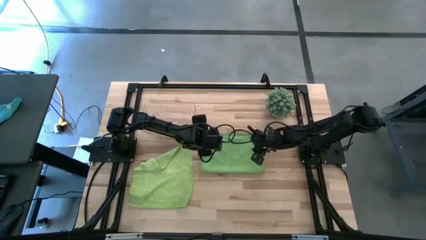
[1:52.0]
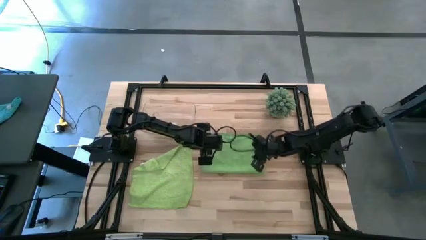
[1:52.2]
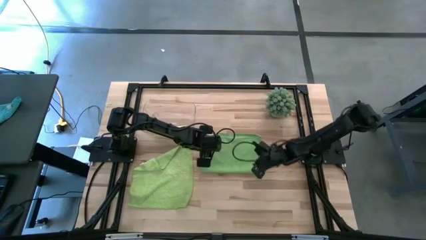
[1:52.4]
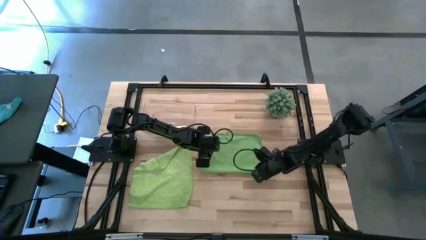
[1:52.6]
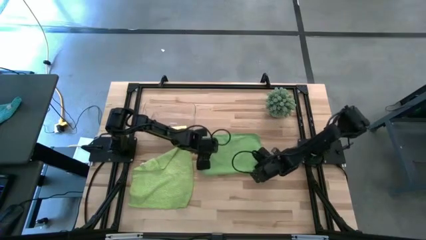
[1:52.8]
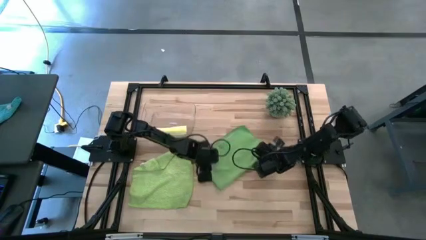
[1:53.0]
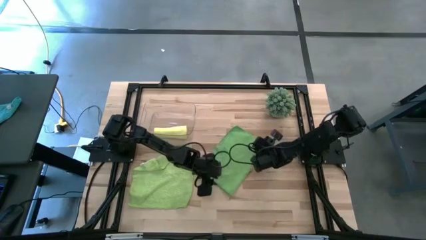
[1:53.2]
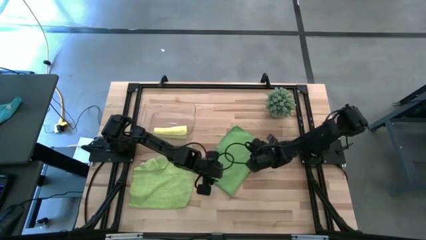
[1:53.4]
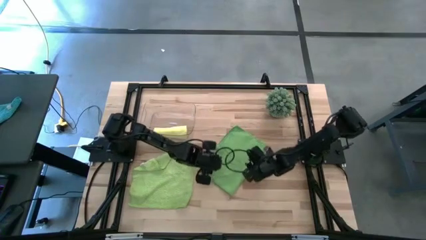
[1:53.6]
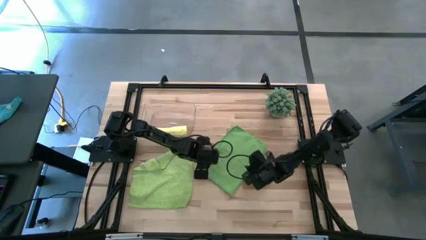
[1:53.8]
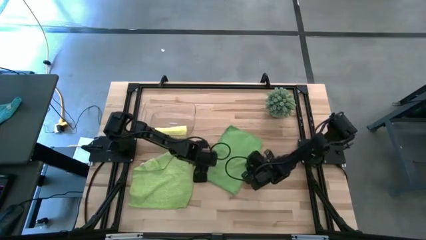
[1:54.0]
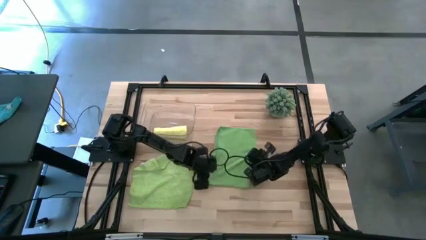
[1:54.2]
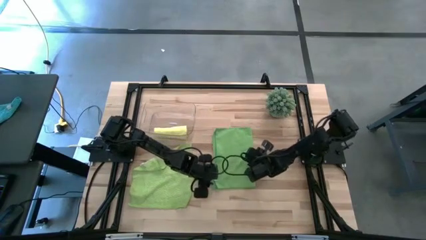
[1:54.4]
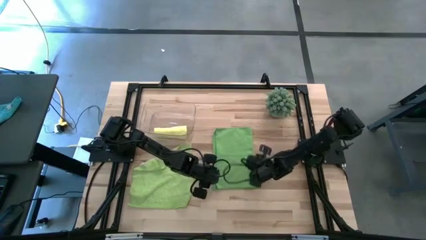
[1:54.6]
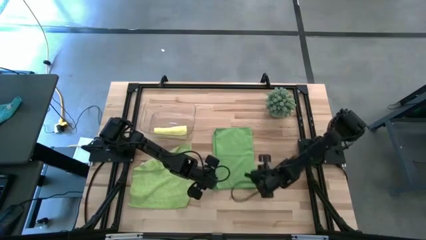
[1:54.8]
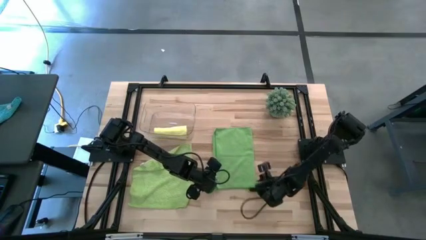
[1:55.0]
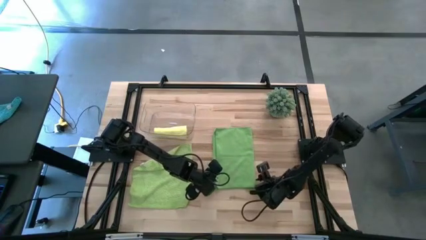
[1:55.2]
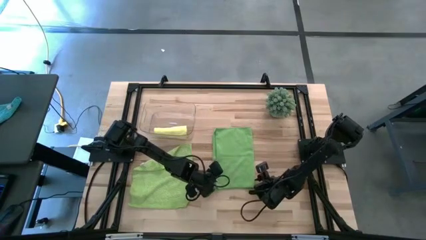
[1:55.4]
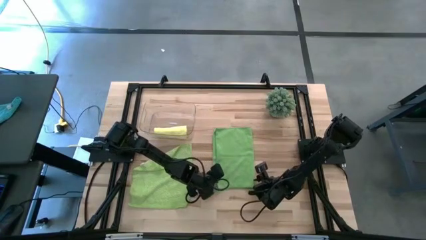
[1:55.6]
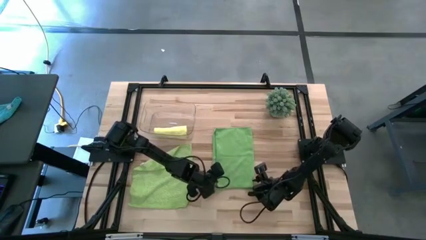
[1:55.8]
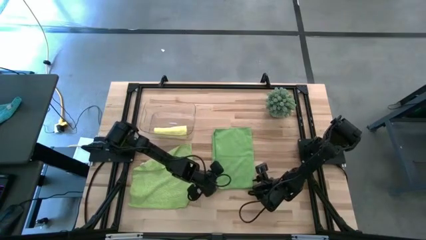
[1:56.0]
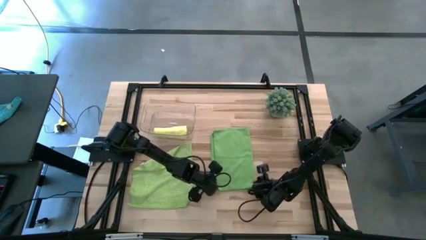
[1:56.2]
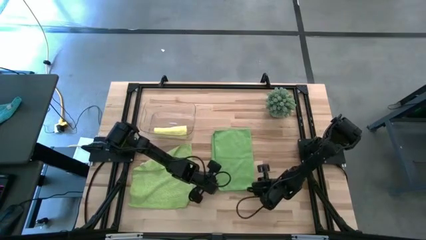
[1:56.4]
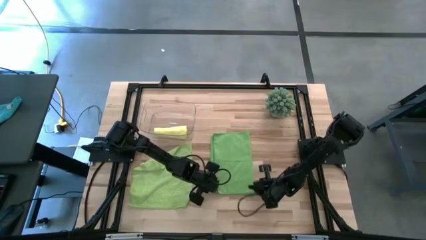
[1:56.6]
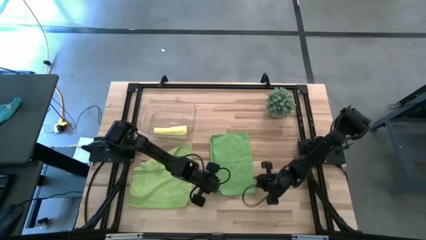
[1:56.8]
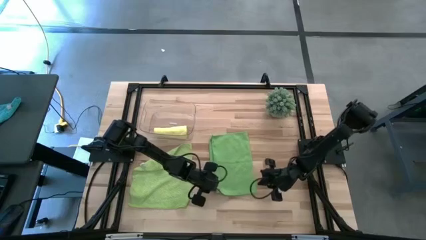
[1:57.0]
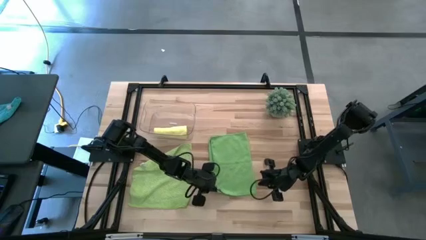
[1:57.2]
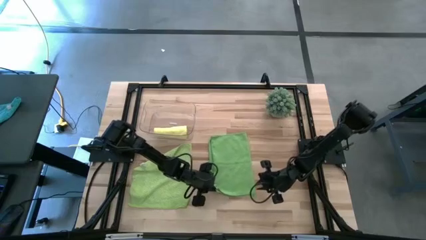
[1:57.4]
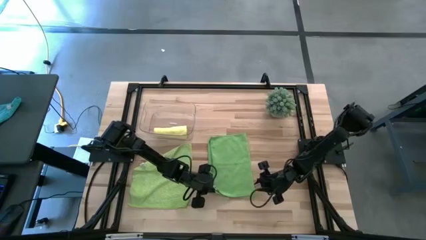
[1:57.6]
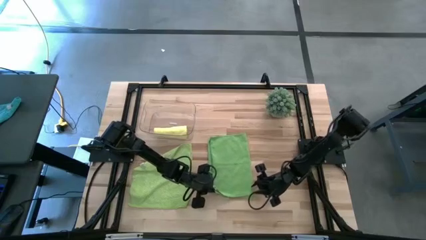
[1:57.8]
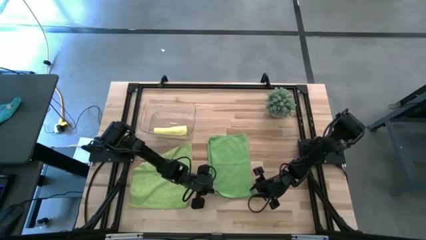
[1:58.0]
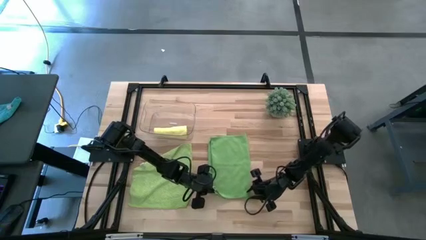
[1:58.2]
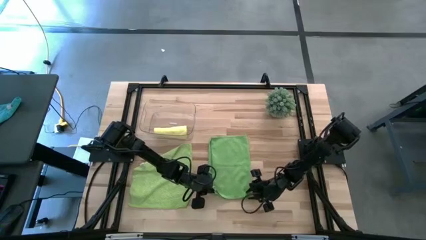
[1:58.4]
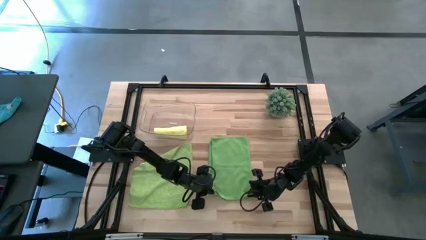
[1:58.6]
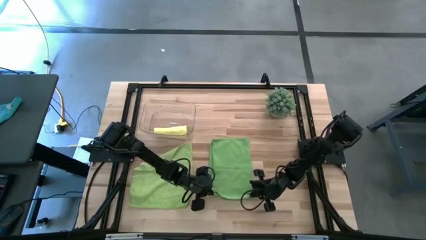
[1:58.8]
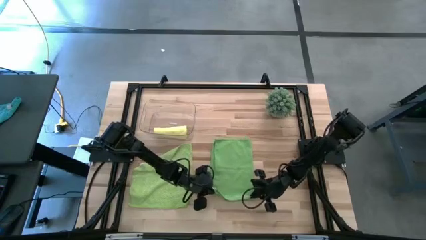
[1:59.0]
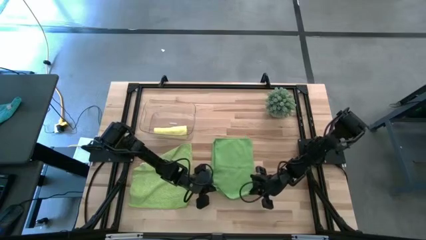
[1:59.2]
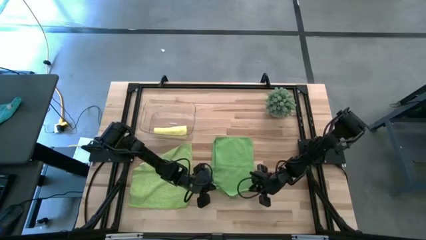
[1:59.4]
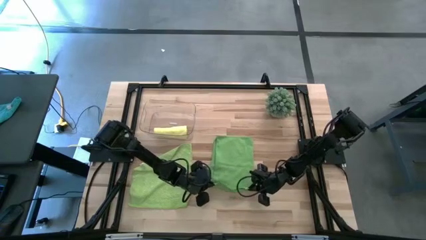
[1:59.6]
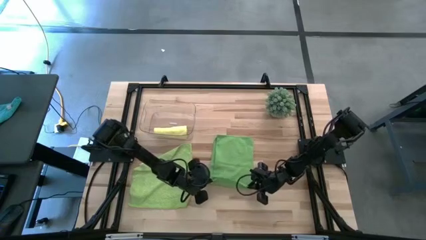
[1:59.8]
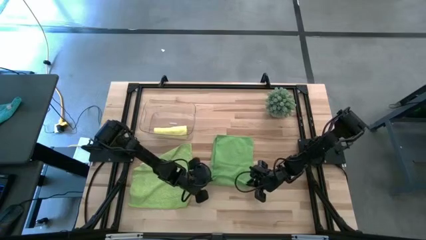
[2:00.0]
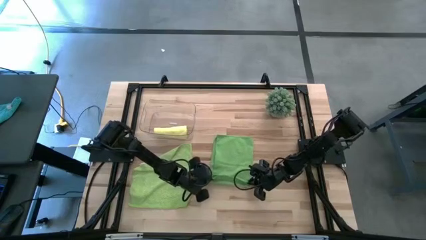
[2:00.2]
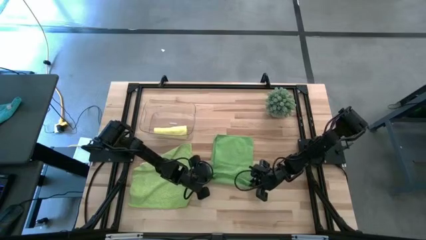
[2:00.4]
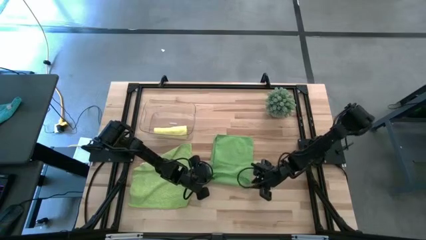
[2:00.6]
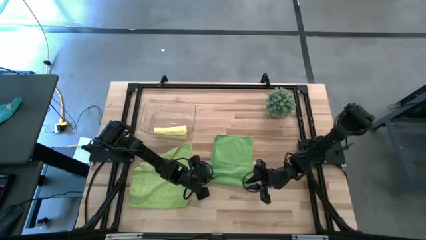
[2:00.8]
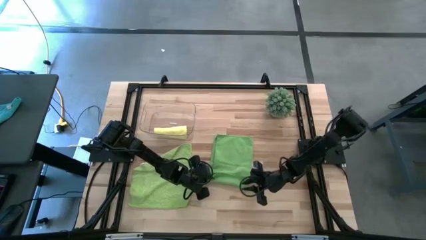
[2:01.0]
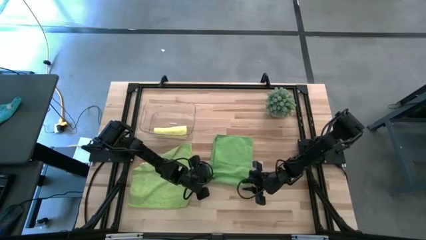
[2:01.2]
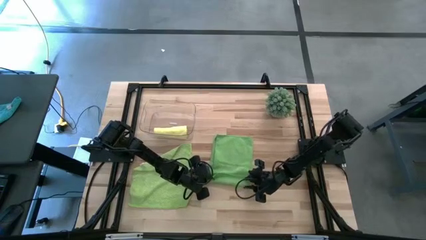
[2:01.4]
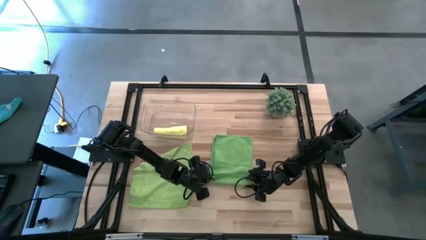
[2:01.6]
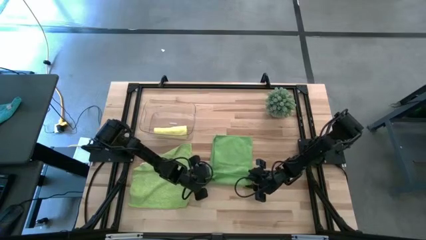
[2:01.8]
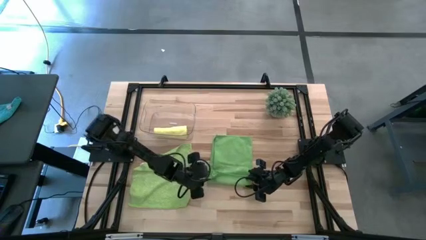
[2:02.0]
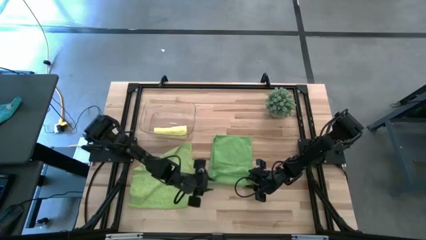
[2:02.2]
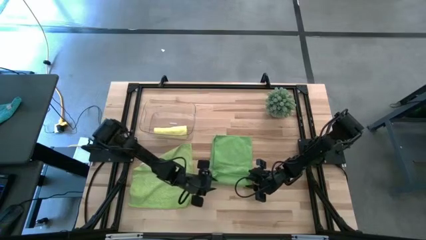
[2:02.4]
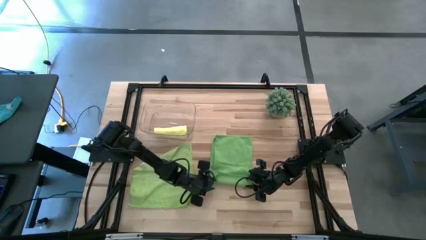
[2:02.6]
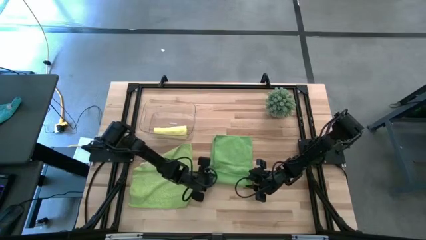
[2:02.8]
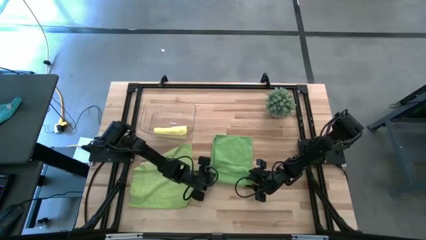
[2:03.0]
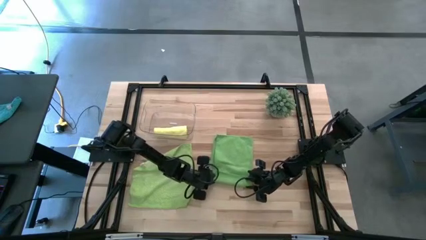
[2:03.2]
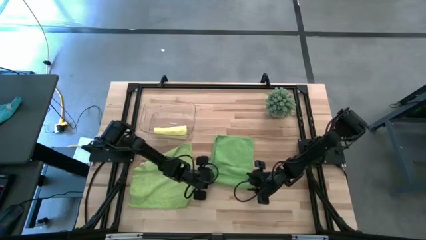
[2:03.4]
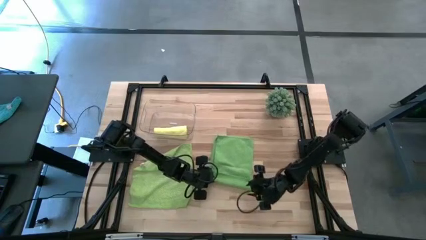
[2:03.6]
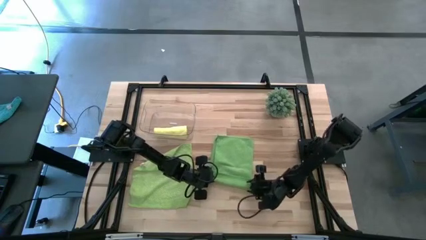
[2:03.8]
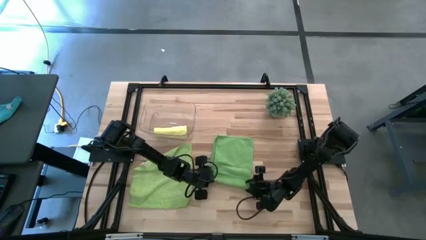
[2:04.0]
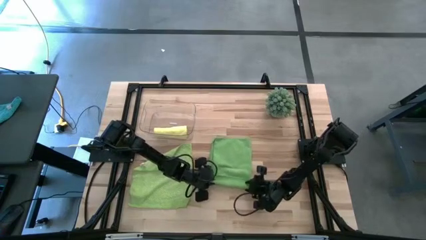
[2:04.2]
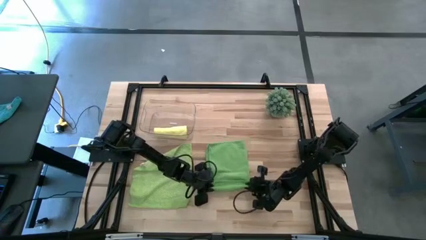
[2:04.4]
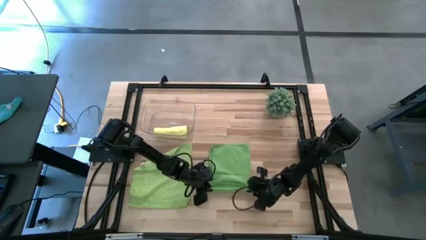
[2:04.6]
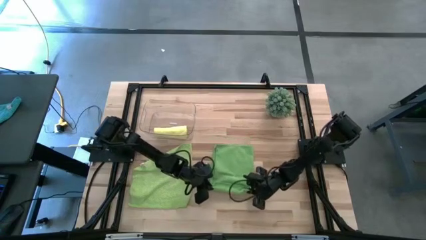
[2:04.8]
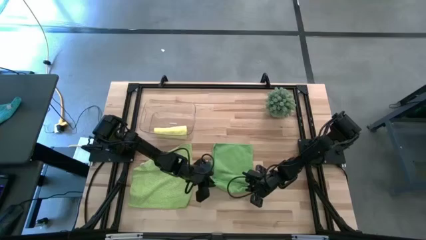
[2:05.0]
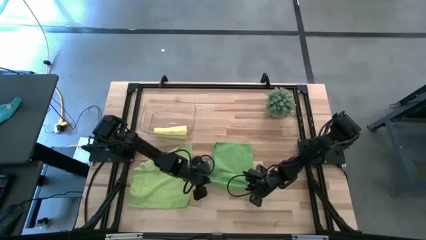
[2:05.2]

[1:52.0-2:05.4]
Task: Roll microfiber towels into tight, uniform cylinder then place into a basket
Roll the right green towel

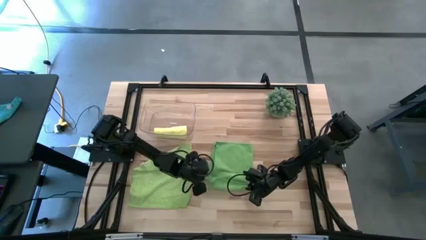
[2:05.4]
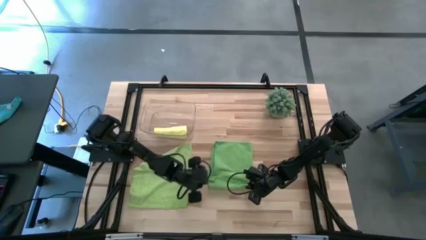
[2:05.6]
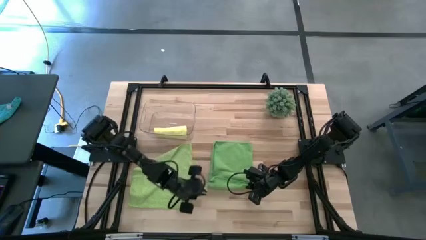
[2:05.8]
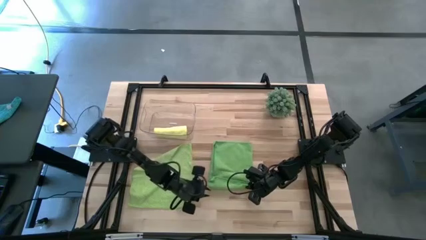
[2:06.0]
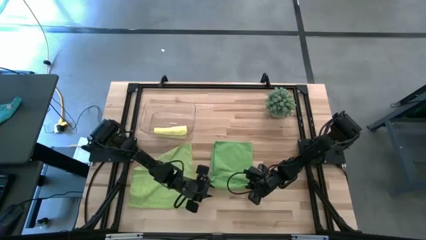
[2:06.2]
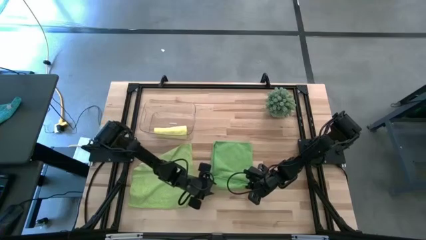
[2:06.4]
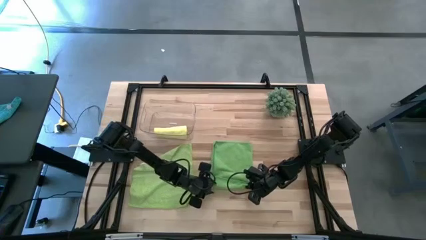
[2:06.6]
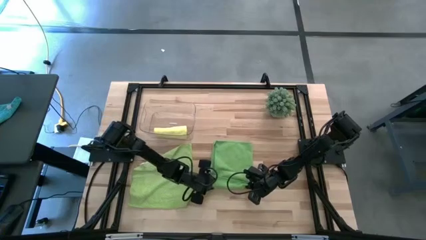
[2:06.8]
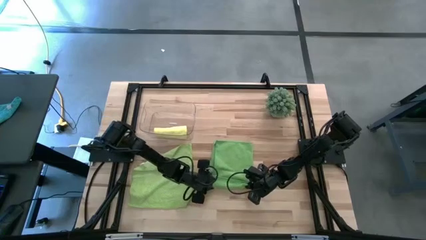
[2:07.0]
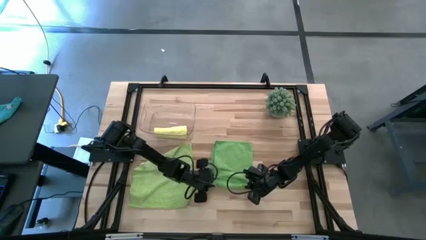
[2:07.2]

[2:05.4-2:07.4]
Roll the right green towel
